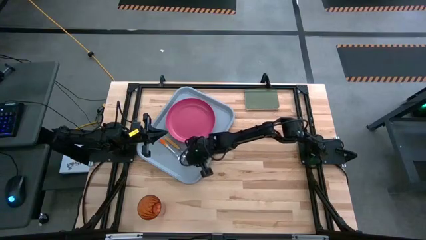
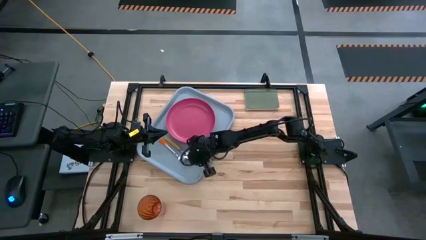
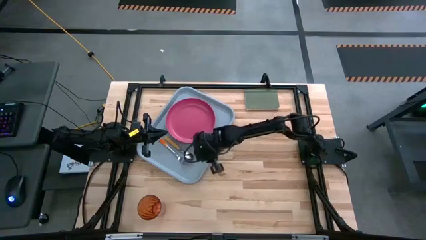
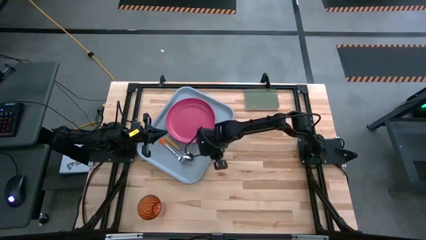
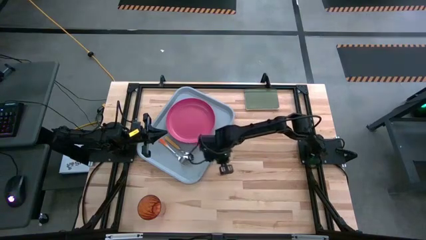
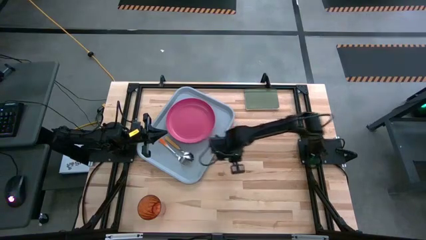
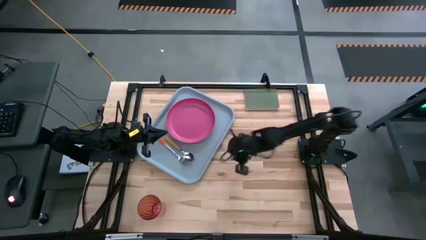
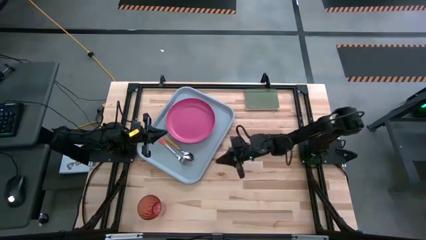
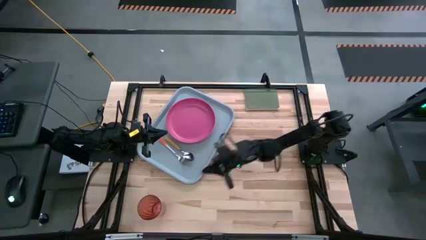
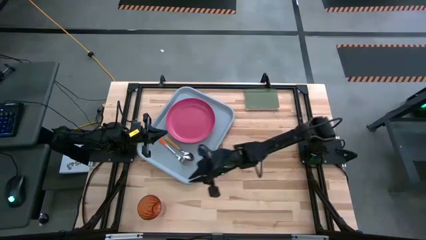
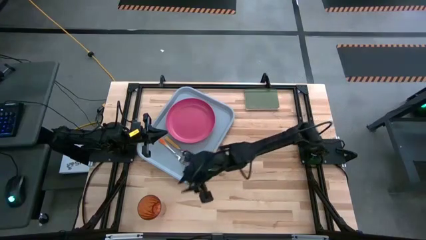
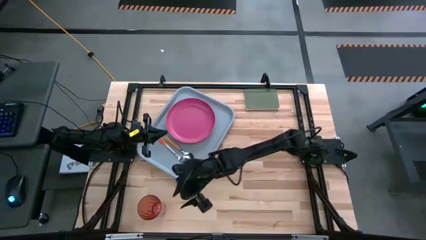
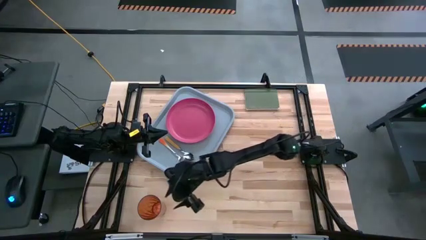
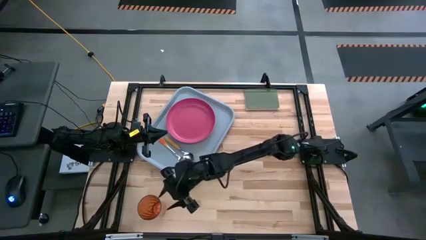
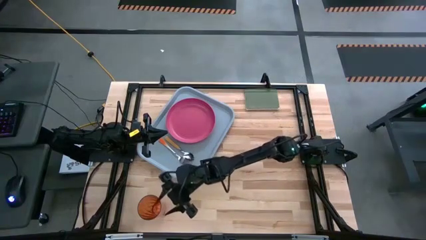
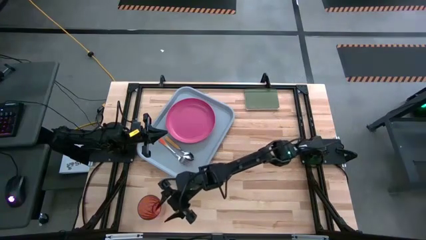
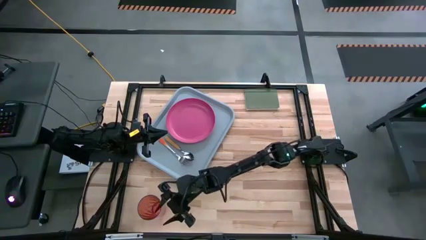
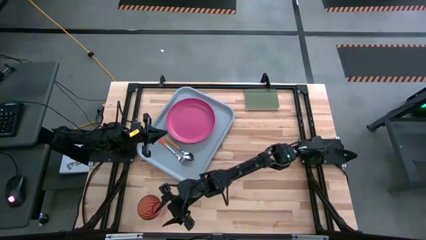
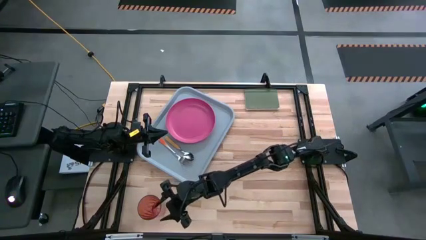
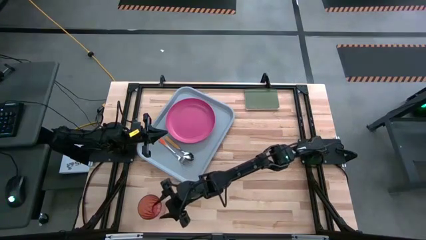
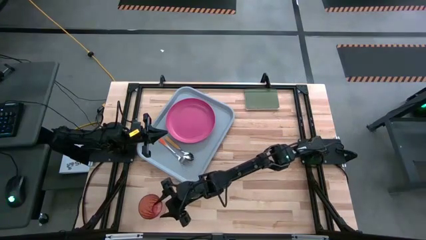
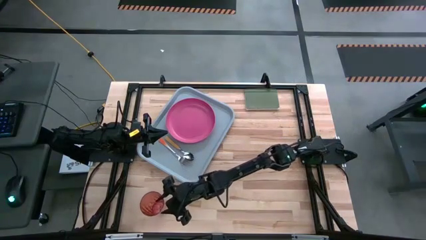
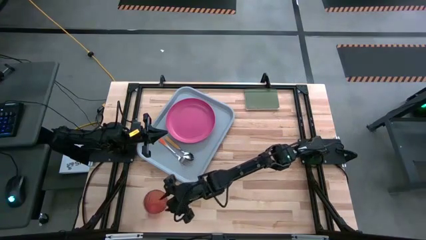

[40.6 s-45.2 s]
Task: Pick and place plate/cup/fork/spoon on tray
Put the orange cup on the grey tray to the top right of the pink plate

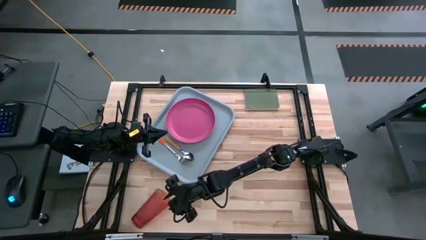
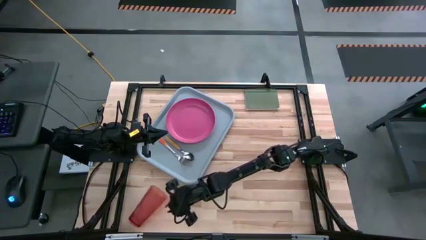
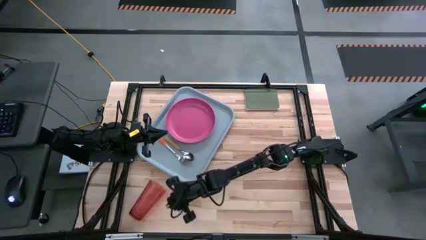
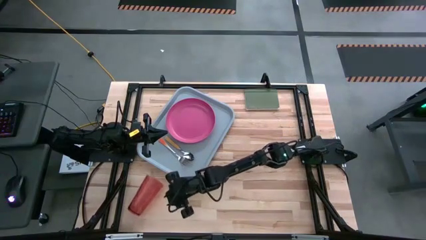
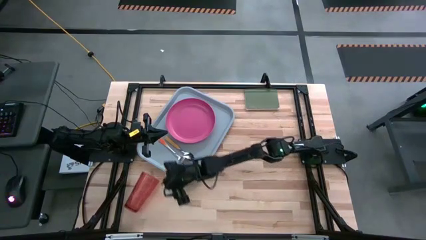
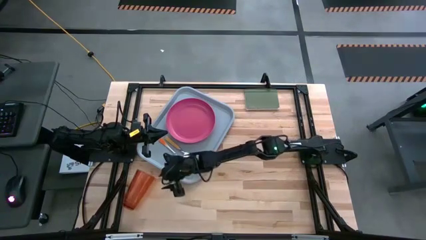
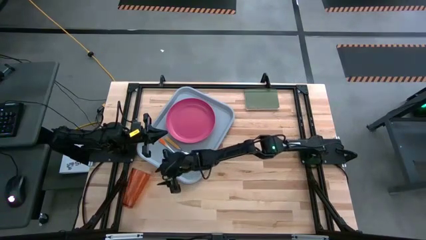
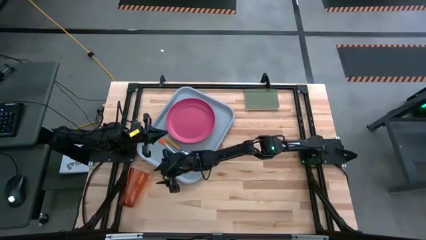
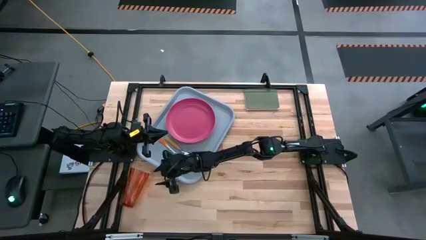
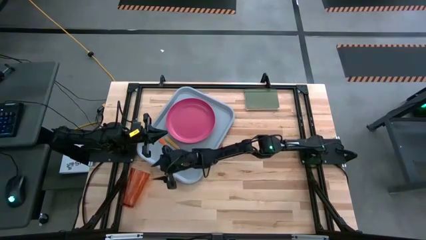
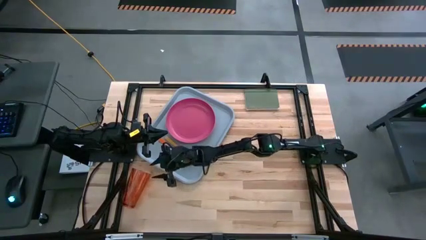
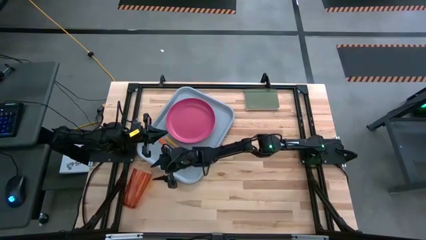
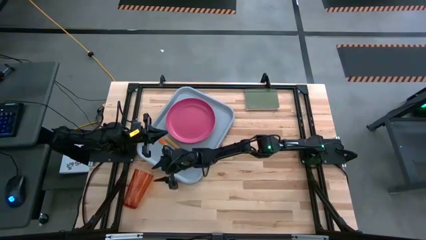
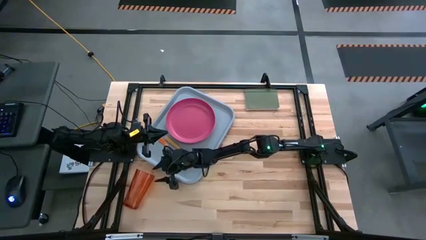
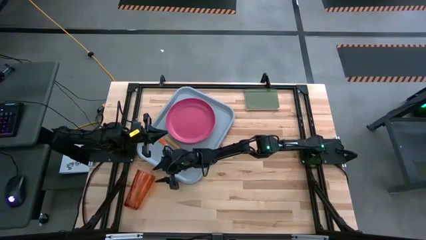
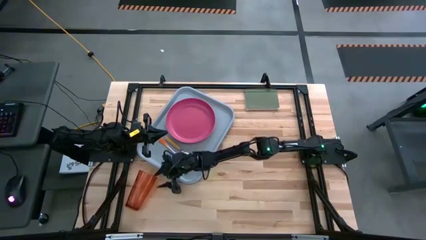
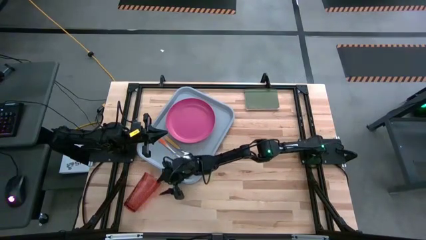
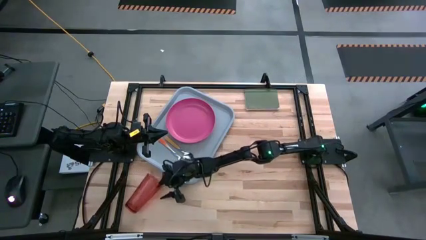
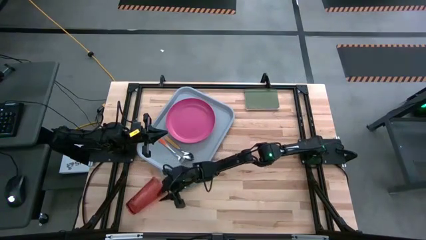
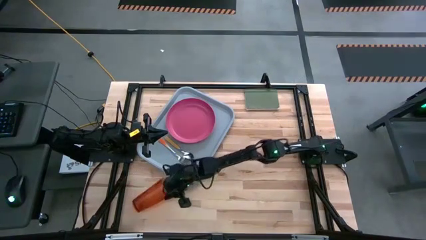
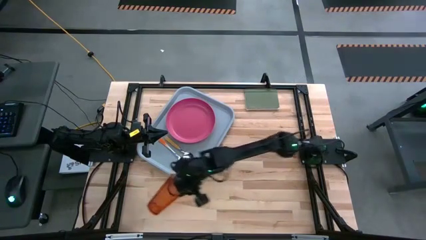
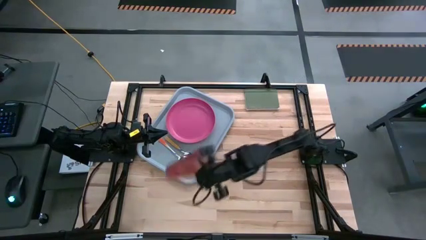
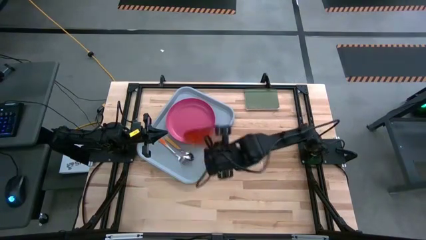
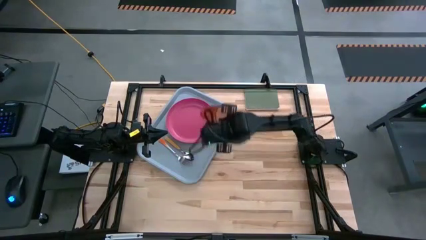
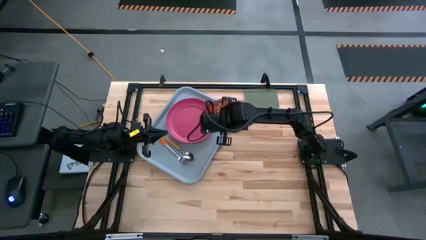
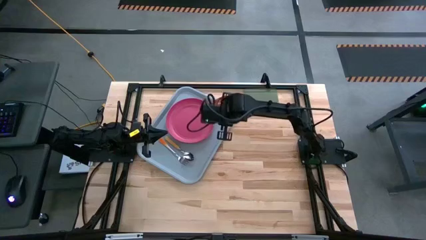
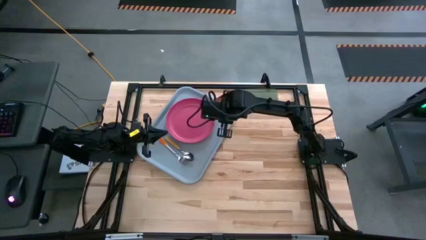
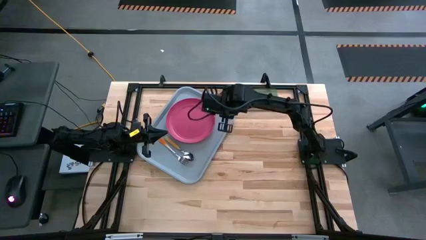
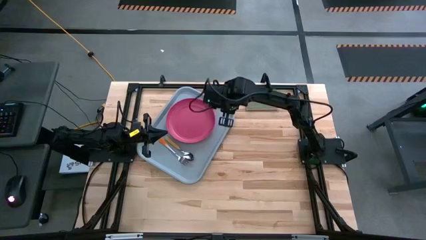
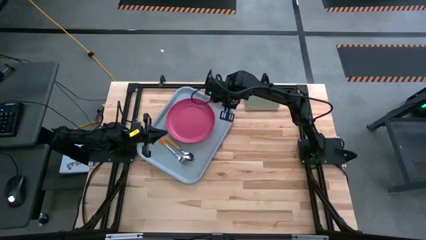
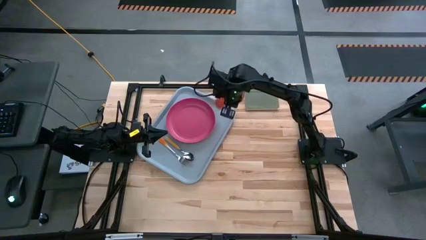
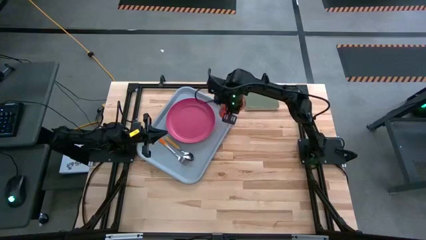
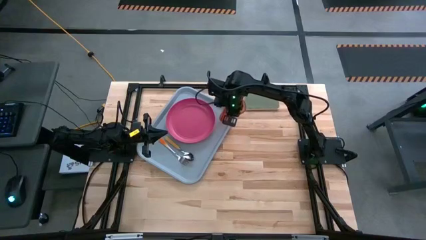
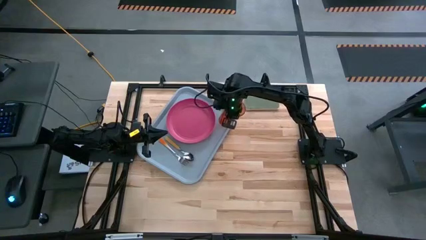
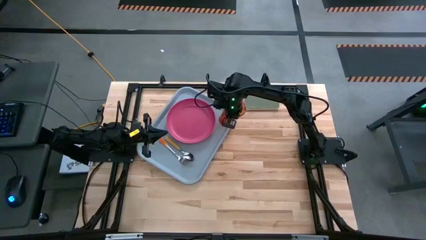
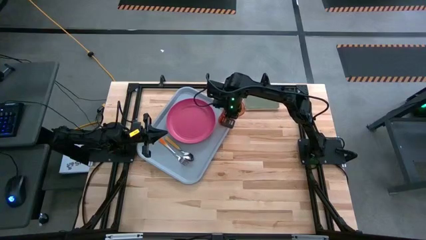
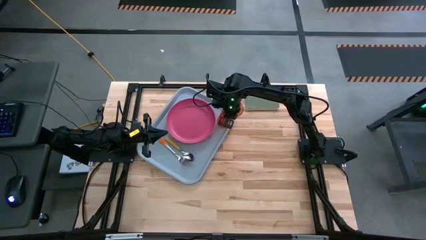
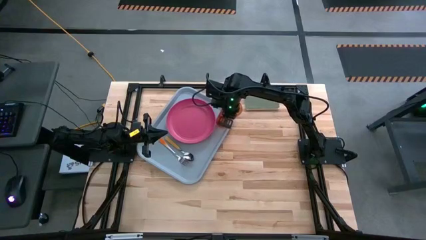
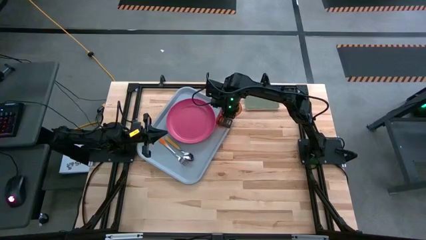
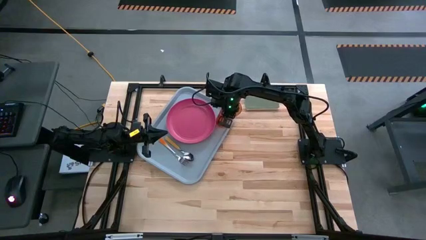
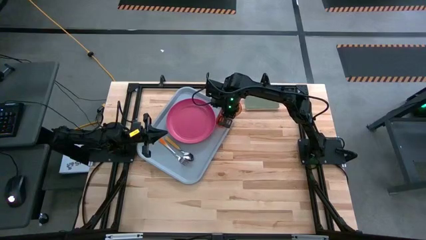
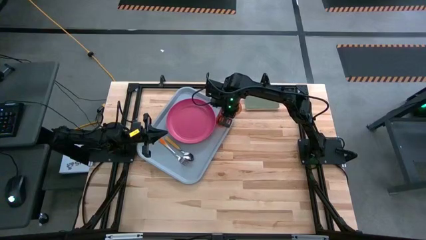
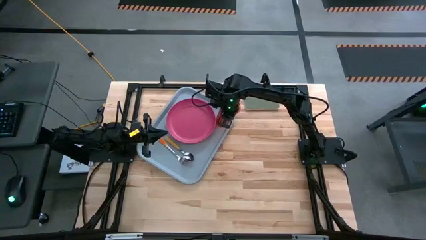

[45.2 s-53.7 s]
Put the orange cup on the grey tray to the top right of the pink plate
